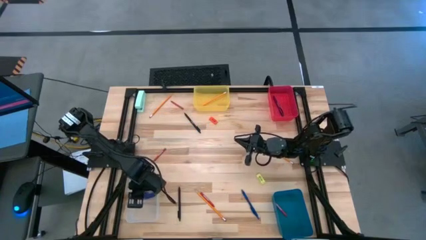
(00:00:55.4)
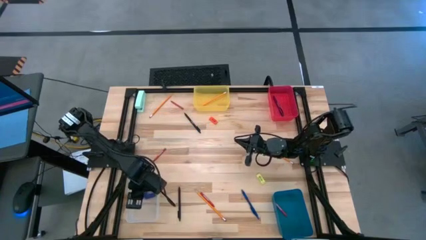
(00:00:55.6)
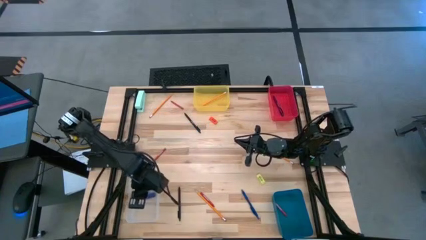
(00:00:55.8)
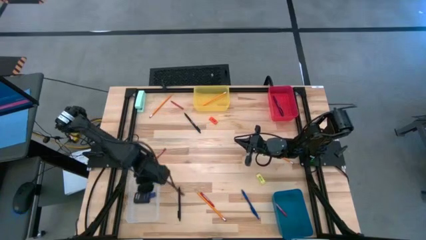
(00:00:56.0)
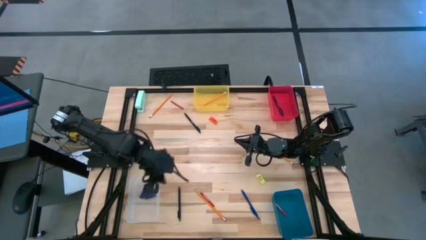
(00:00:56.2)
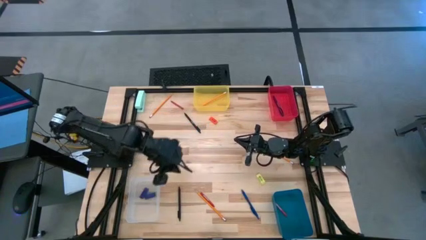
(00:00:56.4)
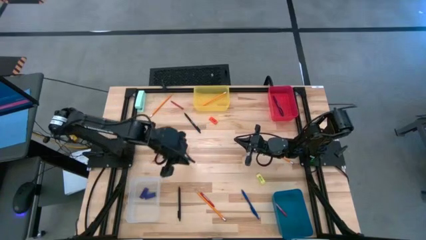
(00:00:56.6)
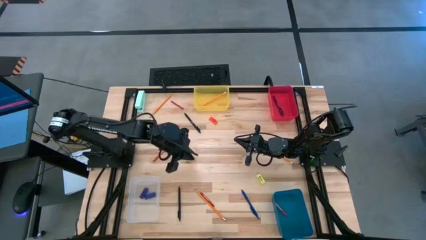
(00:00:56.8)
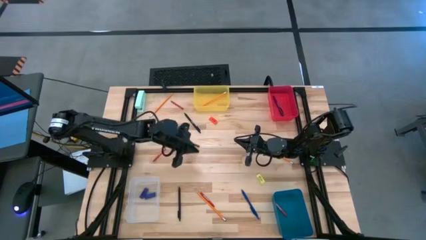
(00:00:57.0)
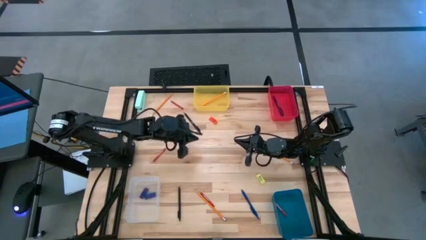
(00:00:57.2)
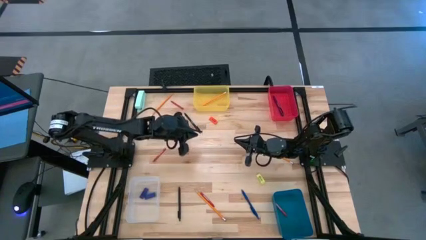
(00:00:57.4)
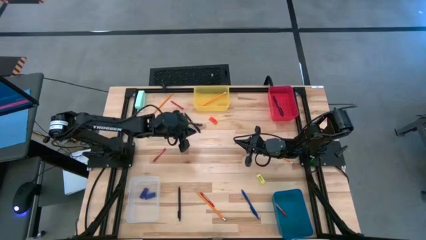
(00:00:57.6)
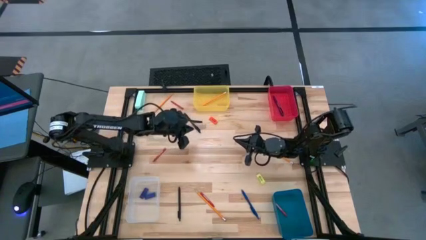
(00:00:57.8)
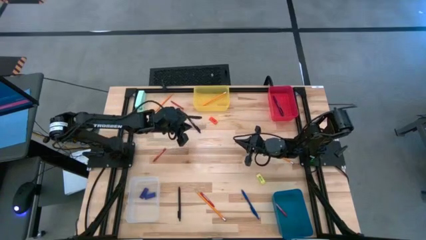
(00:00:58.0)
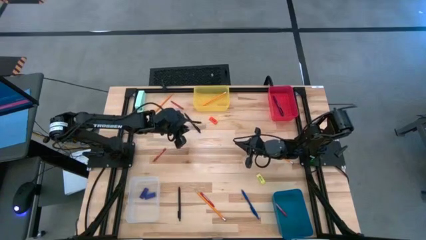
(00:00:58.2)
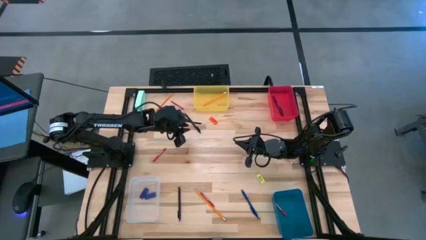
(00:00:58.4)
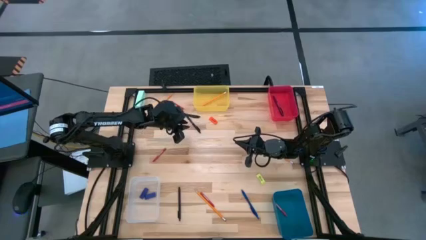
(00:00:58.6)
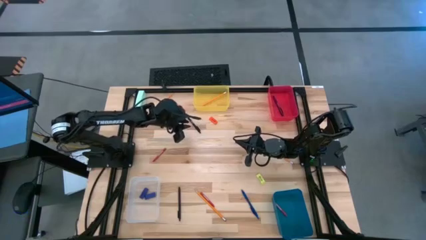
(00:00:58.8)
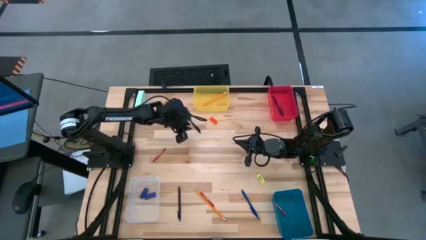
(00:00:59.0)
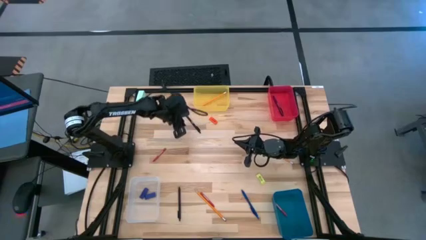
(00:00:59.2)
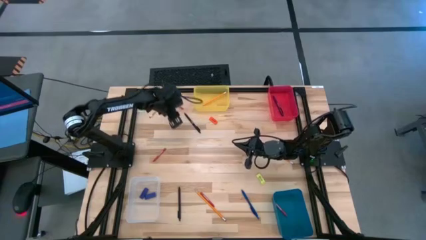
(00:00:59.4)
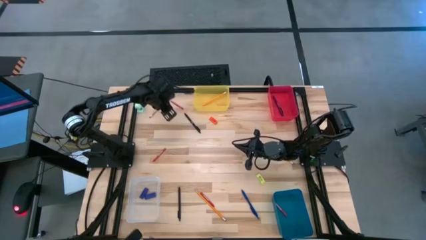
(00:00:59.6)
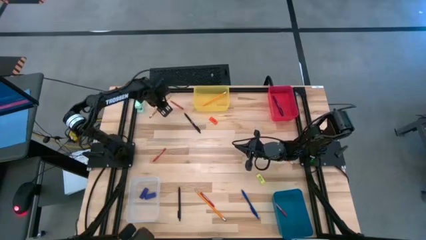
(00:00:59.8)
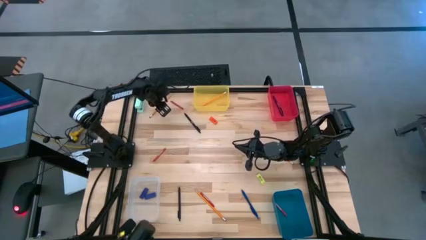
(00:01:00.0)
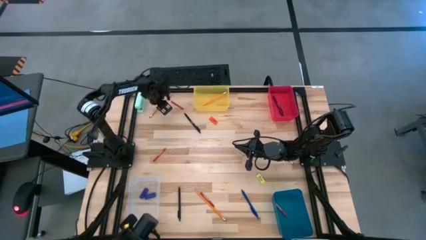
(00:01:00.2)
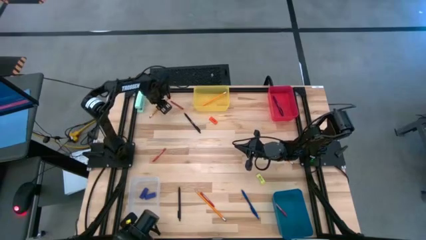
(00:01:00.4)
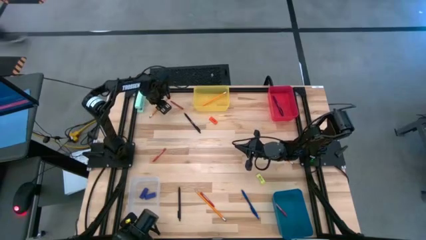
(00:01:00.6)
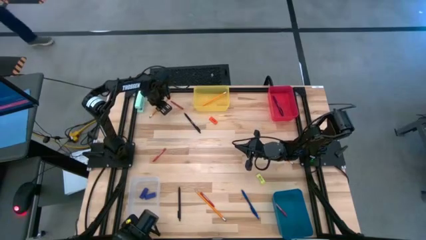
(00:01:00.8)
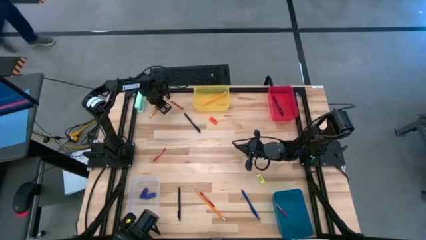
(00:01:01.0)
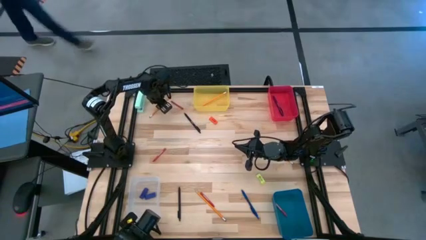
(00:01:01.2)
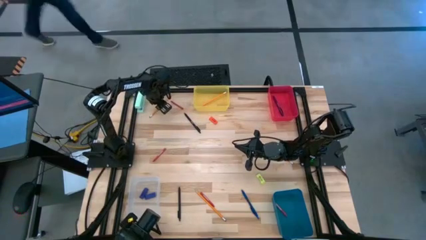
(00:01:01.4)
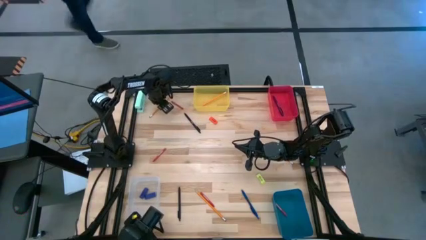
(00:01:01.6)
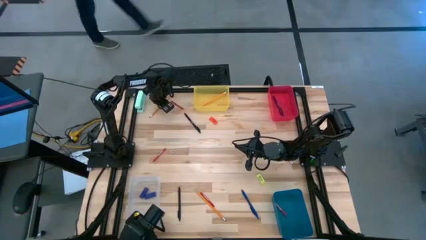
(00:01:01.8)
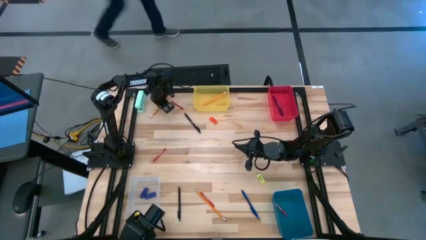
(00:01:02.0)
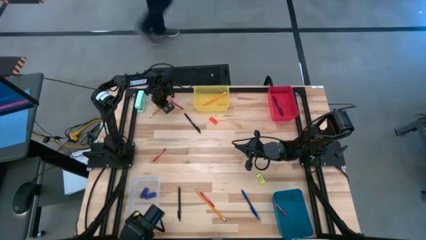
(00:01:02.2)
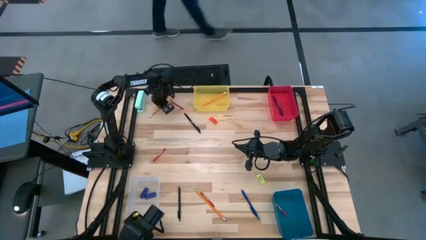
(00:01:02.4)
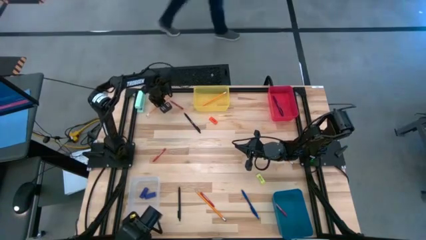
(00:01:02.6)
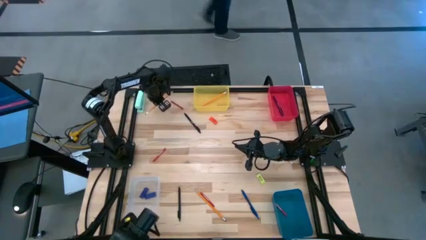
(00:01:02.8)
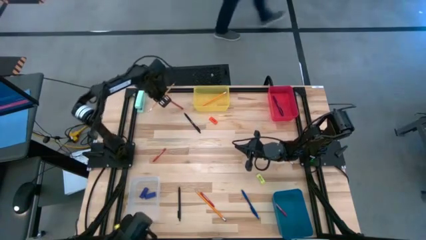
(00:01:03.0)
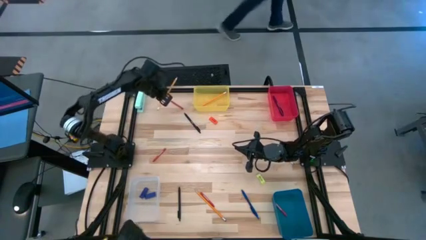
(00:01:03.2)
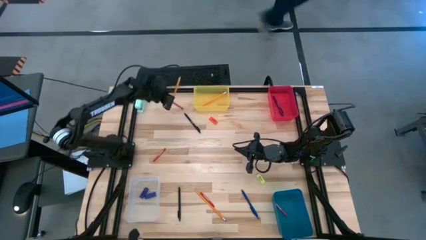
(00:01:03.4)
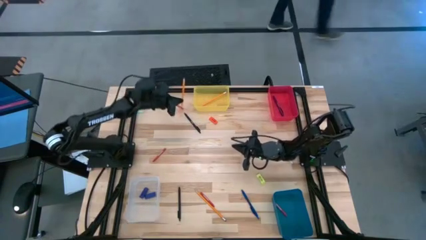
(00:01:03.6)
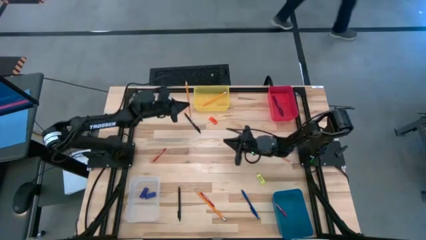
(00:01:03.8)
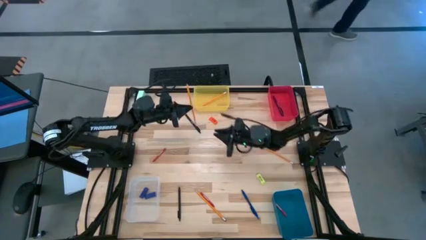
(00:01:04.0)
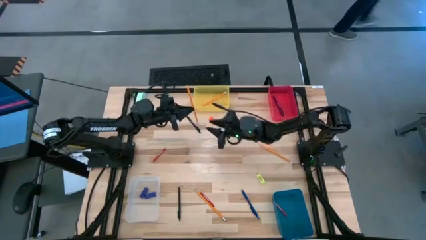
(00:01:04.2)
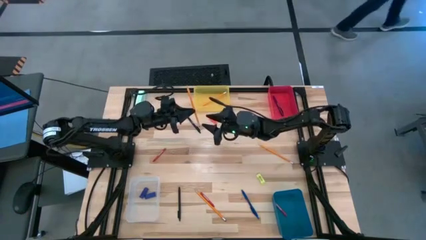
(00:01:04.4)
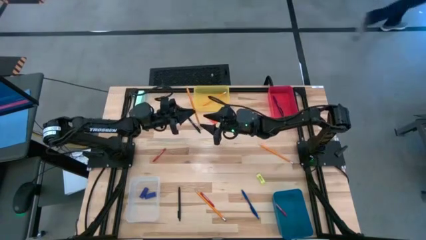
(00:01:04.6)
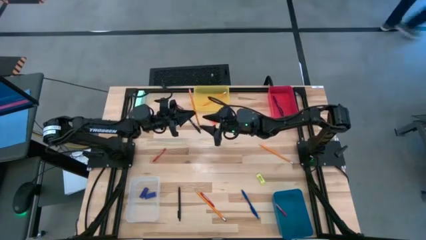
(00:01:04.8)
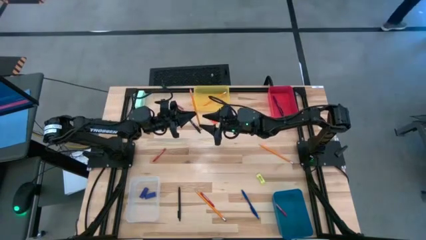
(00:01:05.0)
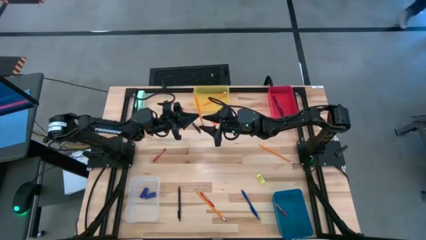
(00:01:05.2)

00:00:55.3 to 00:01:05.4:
Task: Sort crayons/erasers/pens/pencils in bins
Put the orange pencil into the yellow bin

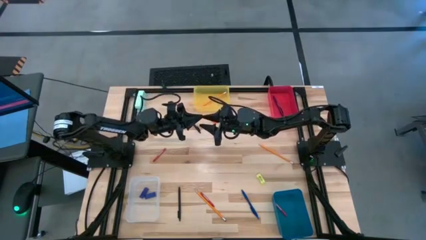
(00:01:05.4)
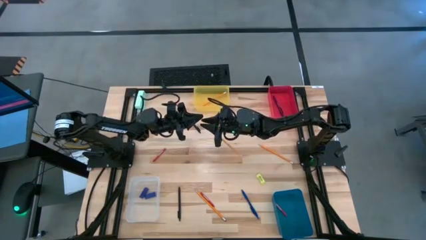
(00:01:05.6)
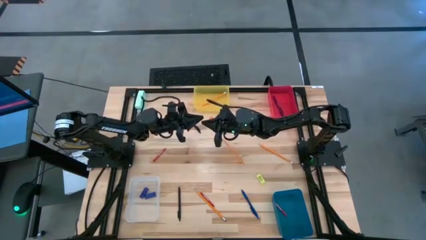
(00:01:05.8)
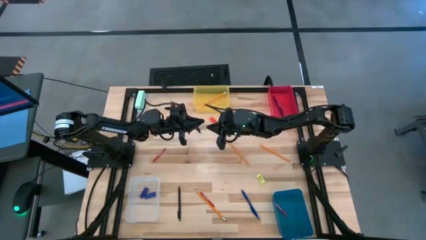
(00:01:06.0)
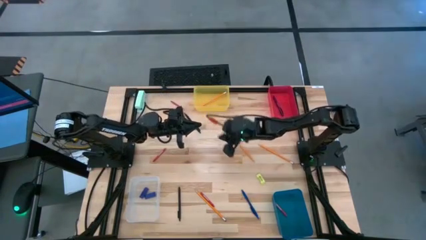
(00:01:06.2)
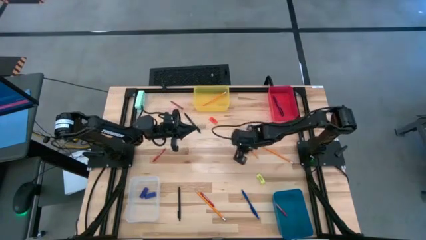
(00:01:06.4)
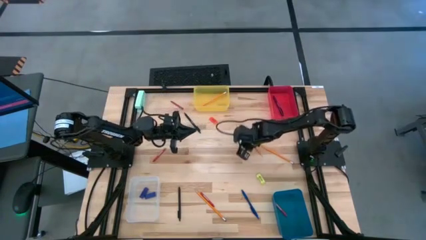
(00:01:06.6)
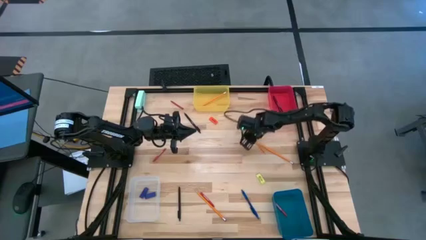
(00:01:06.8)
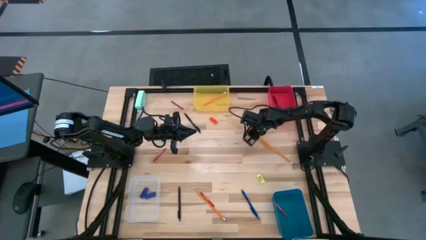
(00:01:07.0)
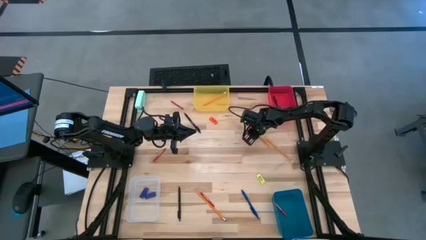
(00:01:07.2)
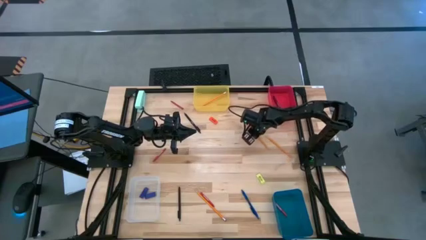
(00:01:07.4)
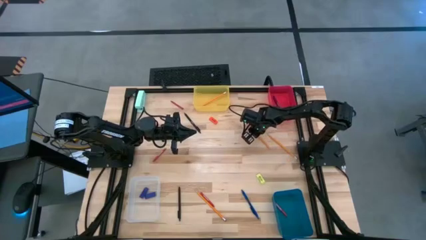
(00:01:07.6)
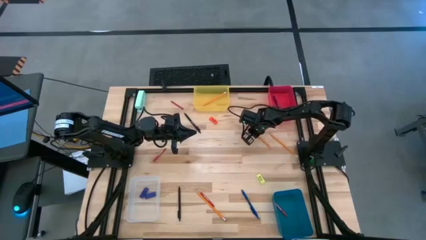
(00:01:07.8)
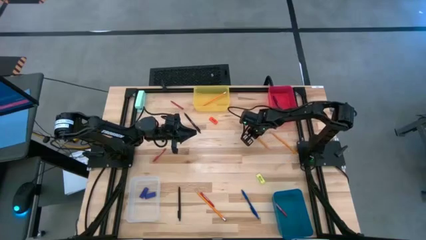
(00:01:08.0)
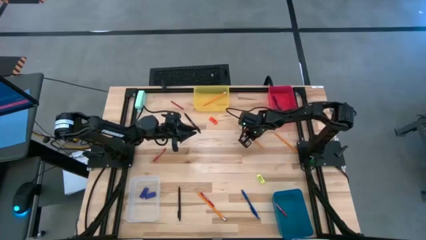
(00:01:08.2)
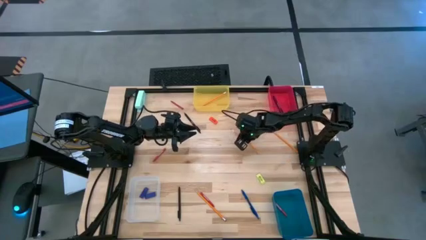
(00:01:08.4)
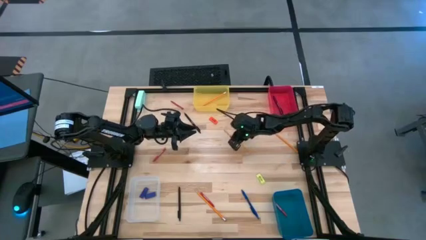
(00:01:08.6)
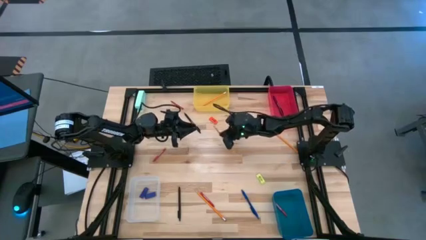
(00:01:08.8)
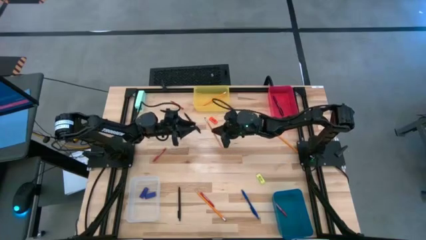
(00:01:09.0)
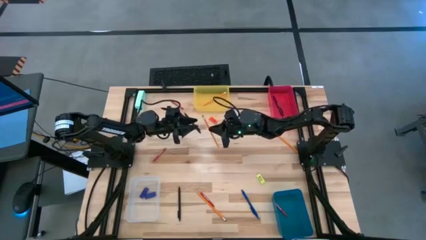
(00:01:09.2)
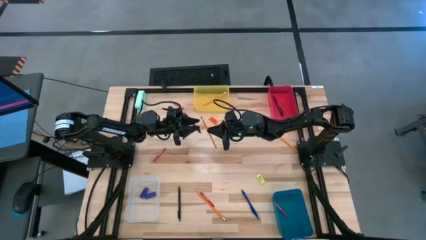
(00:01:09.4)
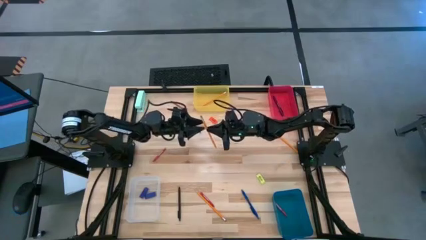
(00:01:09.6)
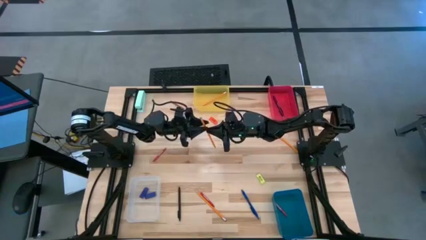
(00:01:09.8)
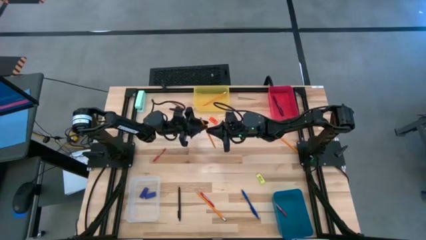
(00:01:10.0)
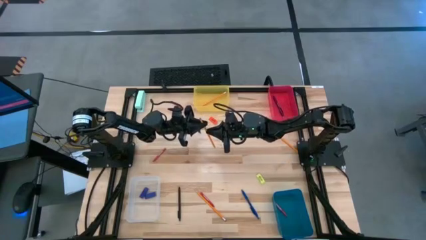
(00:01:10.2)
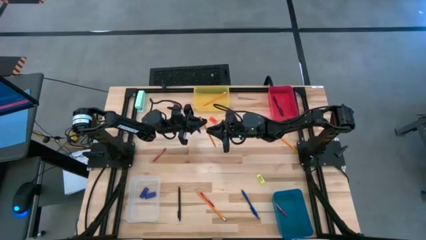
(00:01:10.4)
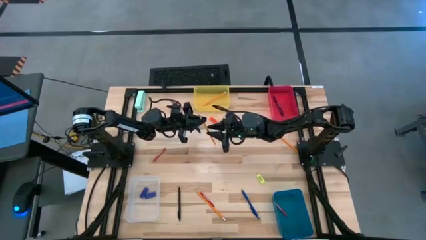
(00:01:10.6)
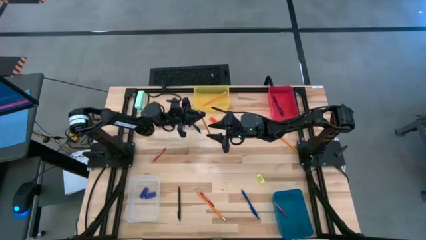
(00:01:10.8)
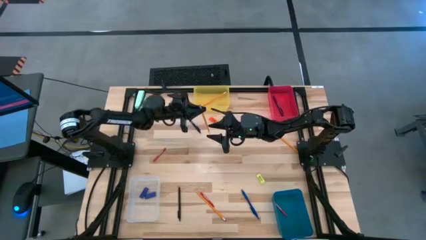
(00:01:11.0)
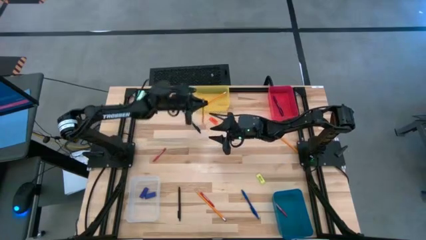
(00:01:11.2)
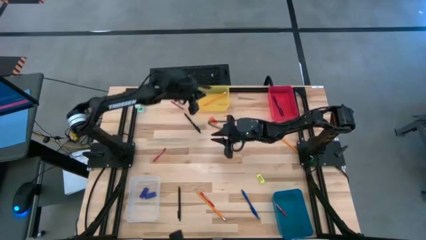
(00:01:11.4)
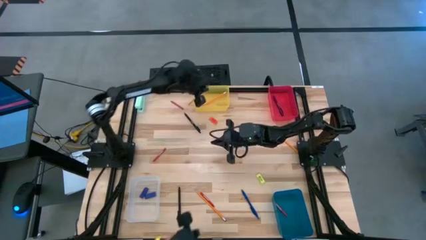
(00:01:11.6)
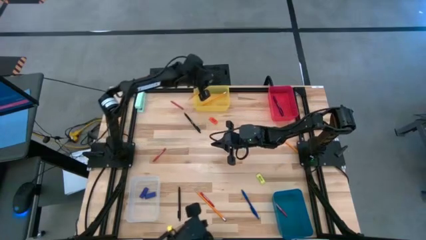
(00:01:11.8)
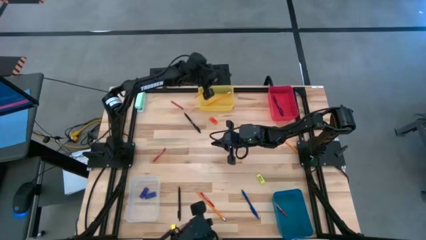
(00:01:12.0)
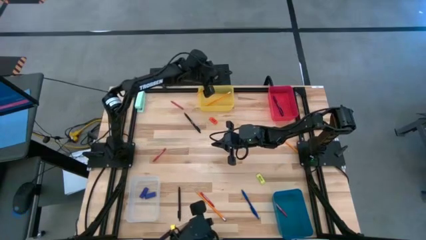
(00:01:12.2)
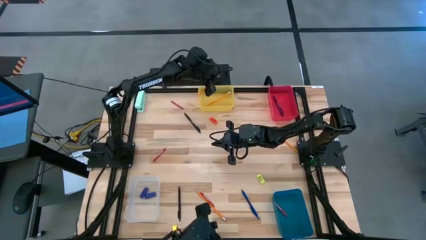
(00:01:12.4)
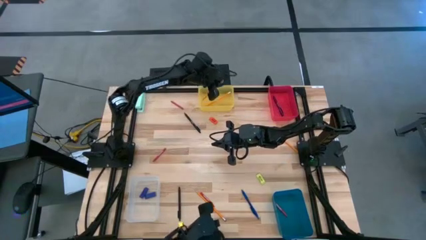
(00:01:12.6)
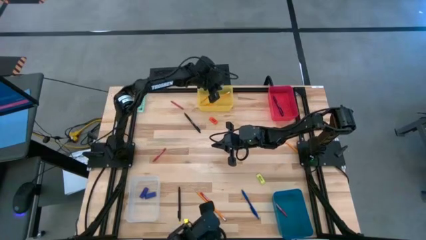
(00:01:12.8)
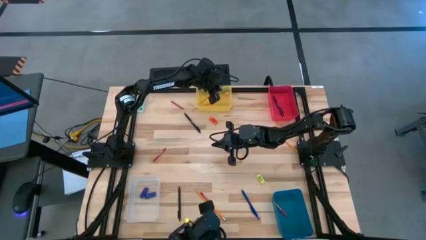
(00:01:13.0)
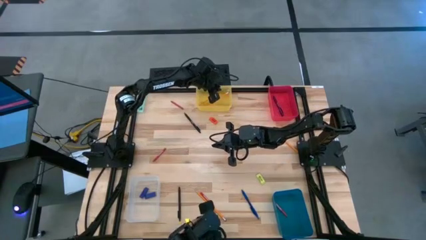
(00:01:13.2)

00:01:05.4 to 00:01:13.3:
Put the orange pencil into the yellow bin
